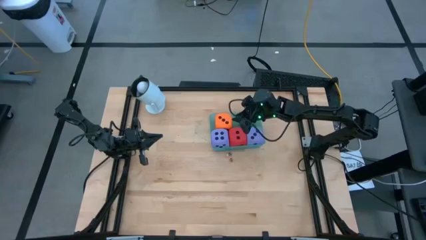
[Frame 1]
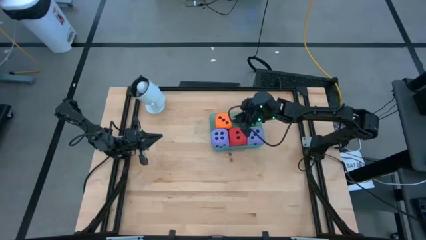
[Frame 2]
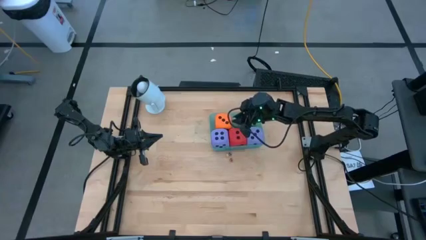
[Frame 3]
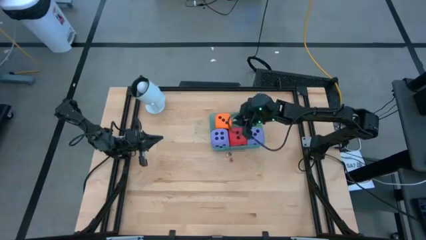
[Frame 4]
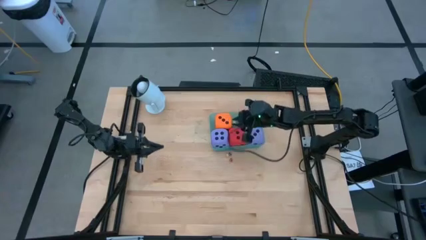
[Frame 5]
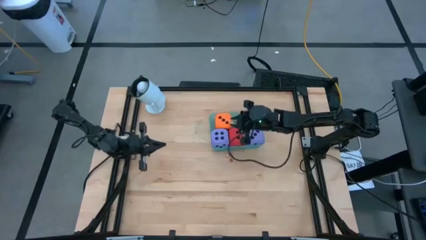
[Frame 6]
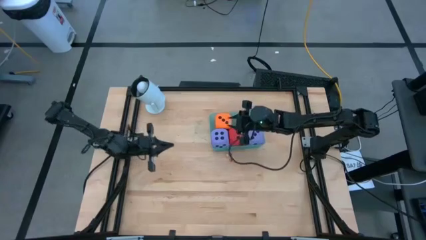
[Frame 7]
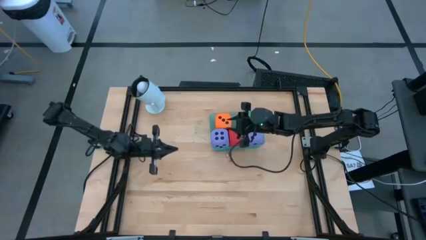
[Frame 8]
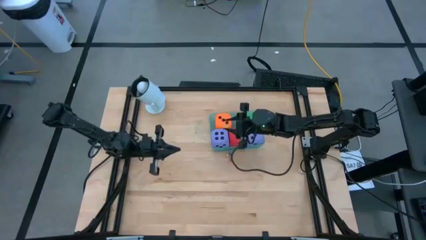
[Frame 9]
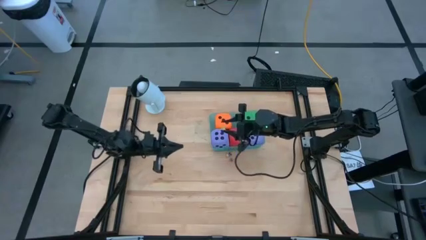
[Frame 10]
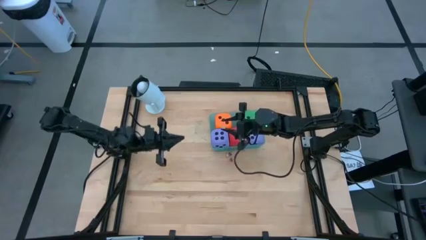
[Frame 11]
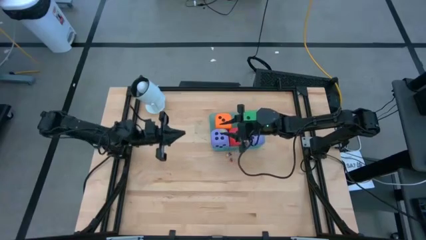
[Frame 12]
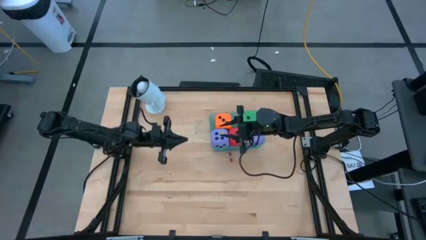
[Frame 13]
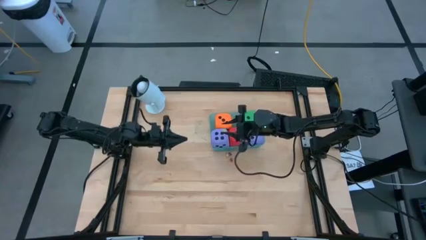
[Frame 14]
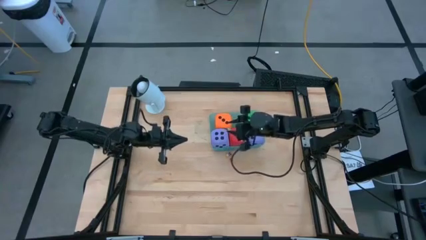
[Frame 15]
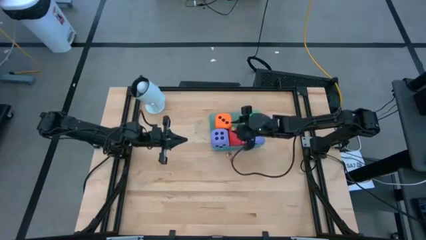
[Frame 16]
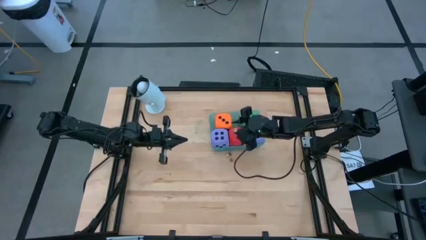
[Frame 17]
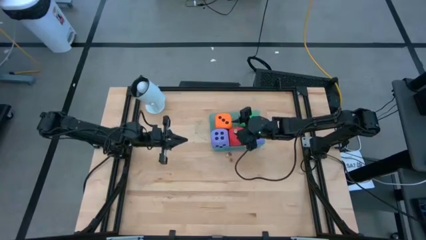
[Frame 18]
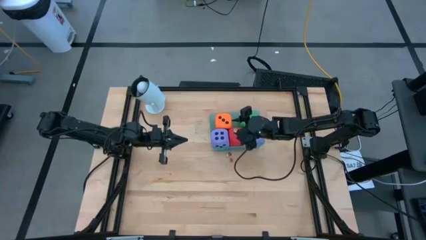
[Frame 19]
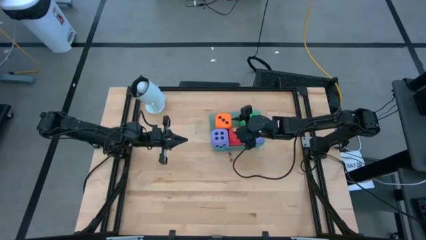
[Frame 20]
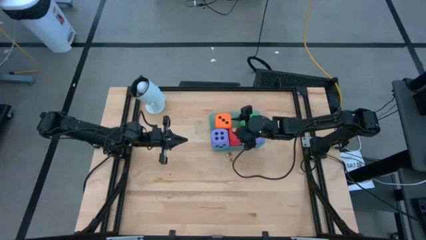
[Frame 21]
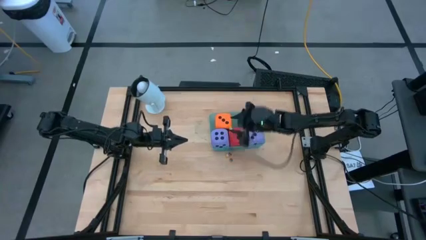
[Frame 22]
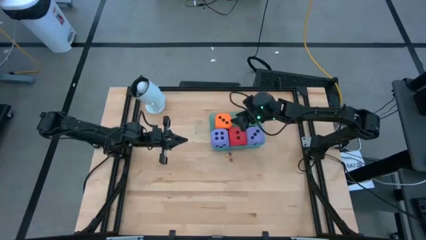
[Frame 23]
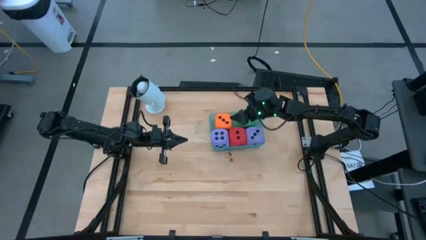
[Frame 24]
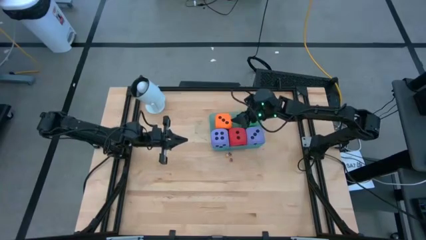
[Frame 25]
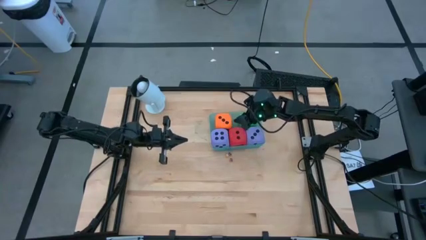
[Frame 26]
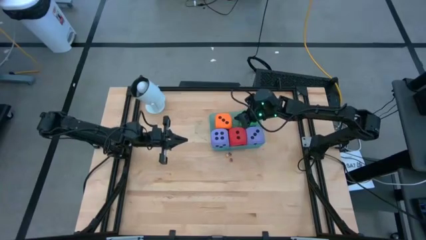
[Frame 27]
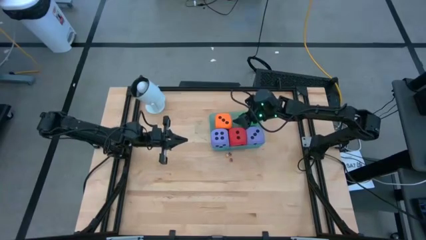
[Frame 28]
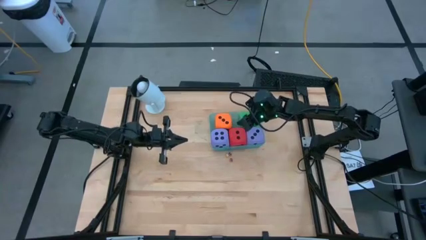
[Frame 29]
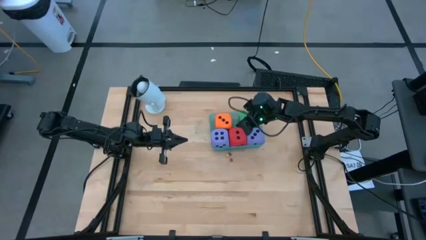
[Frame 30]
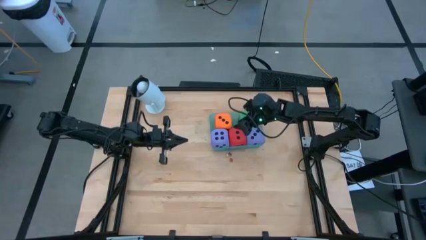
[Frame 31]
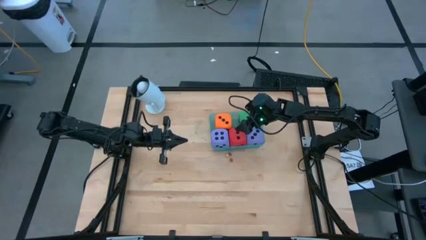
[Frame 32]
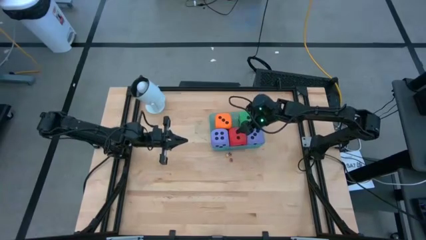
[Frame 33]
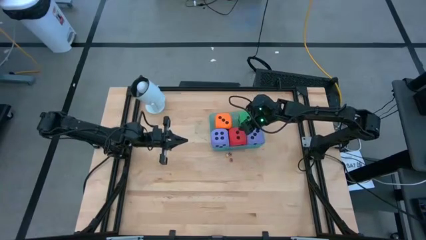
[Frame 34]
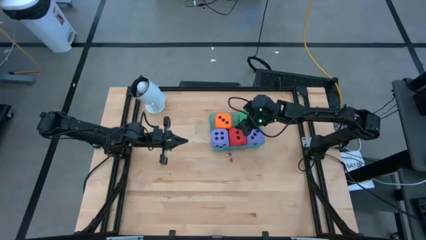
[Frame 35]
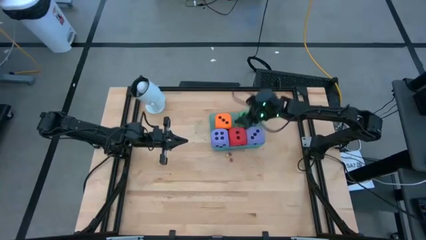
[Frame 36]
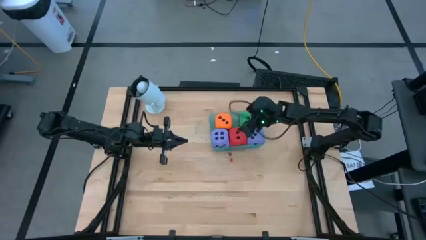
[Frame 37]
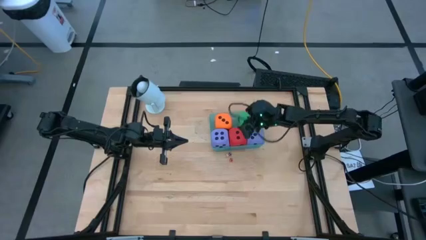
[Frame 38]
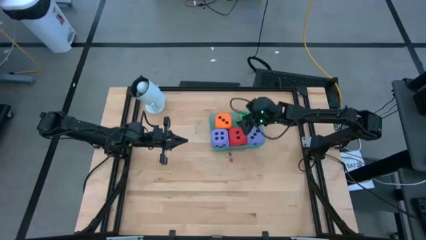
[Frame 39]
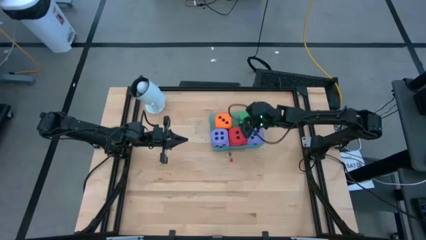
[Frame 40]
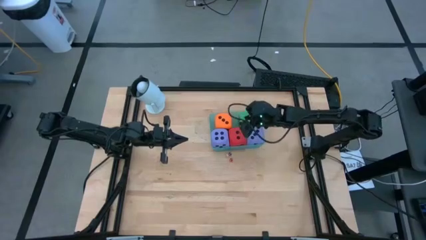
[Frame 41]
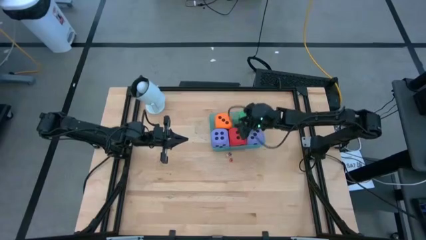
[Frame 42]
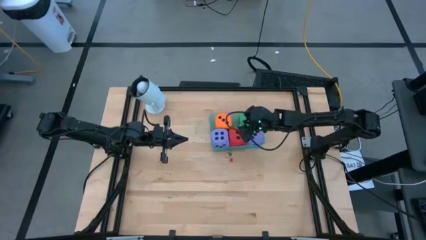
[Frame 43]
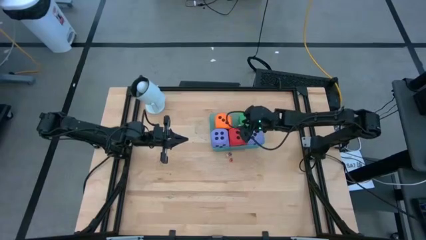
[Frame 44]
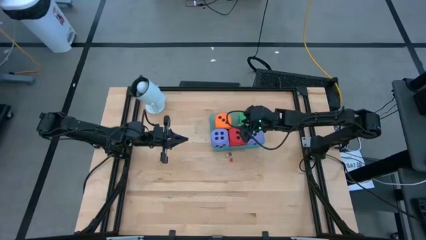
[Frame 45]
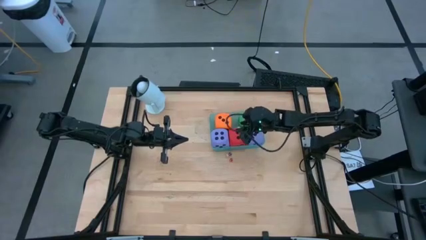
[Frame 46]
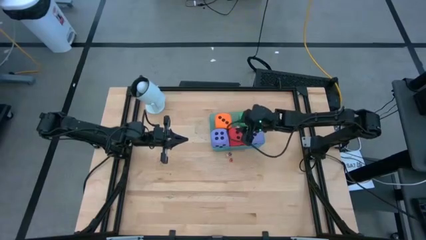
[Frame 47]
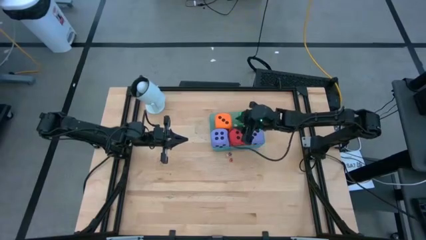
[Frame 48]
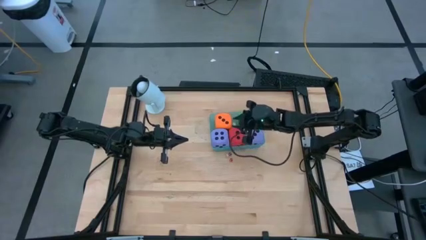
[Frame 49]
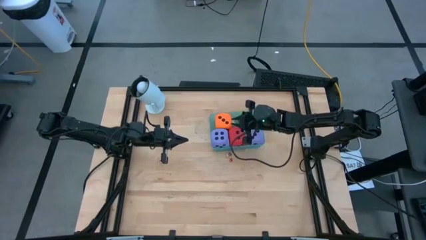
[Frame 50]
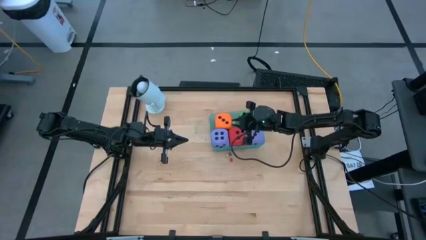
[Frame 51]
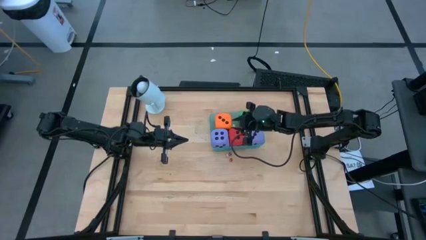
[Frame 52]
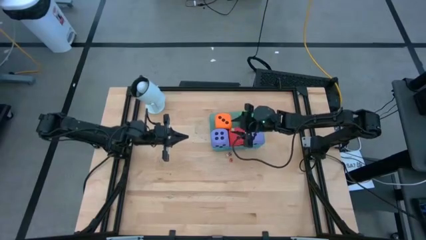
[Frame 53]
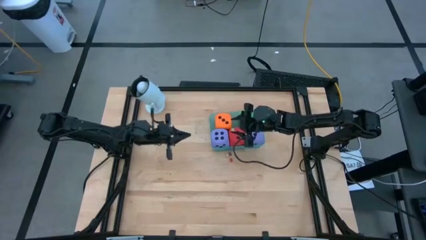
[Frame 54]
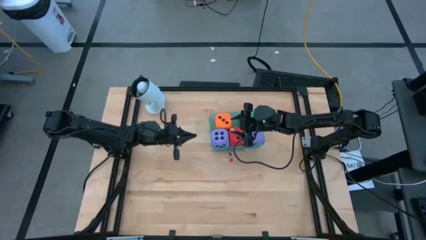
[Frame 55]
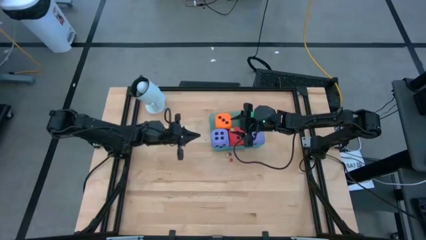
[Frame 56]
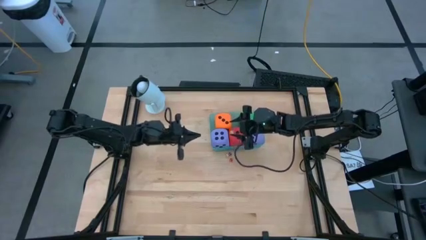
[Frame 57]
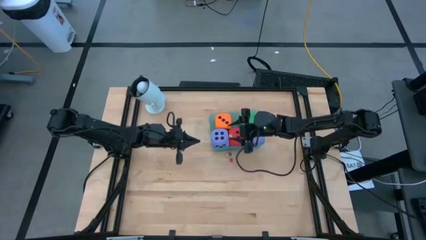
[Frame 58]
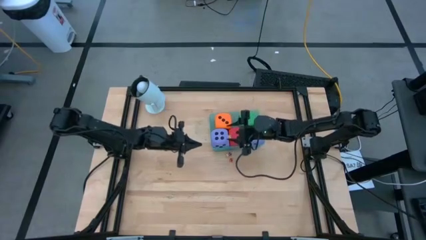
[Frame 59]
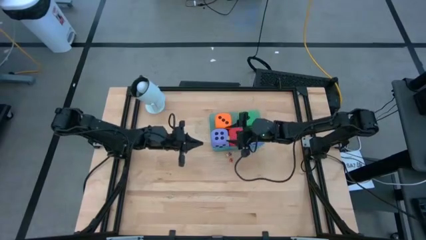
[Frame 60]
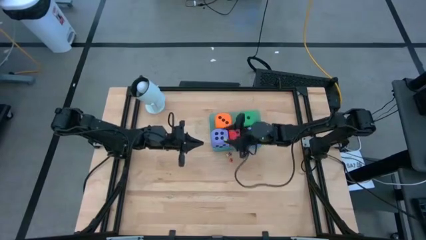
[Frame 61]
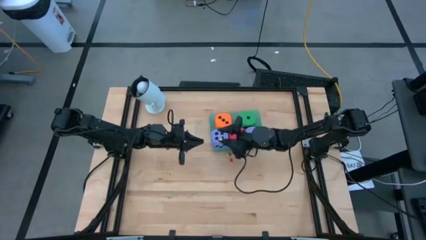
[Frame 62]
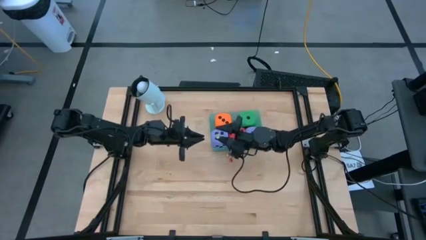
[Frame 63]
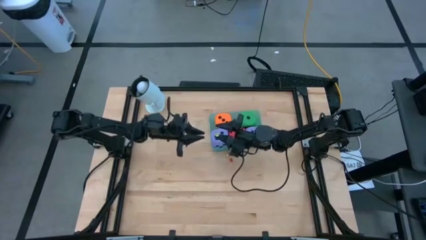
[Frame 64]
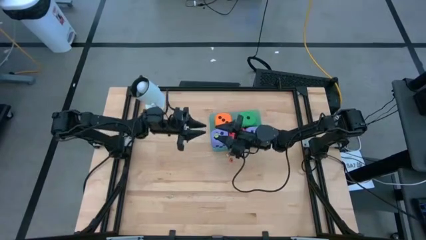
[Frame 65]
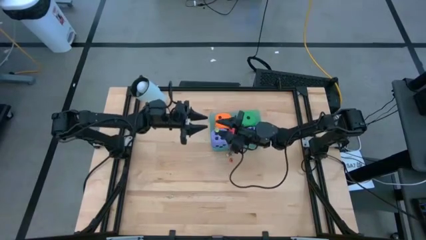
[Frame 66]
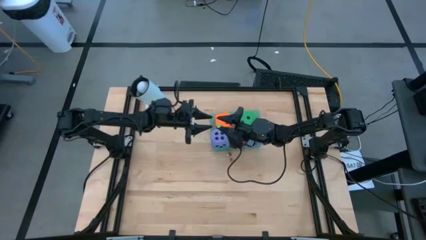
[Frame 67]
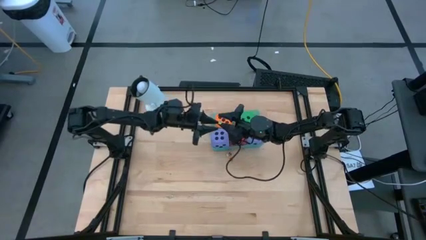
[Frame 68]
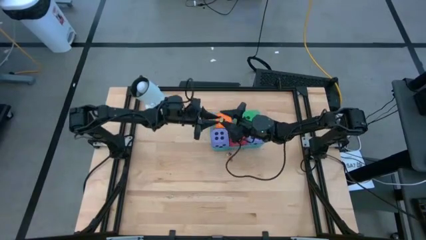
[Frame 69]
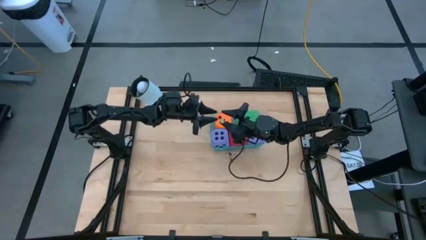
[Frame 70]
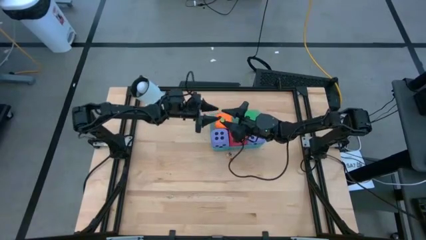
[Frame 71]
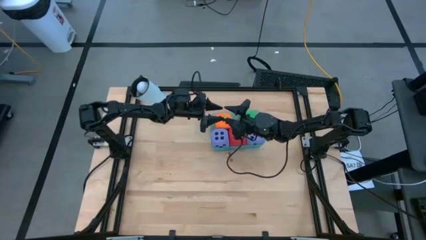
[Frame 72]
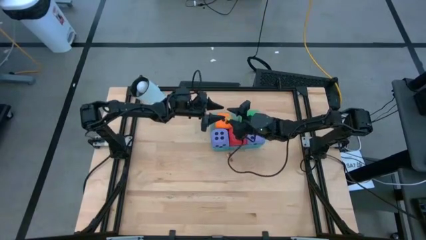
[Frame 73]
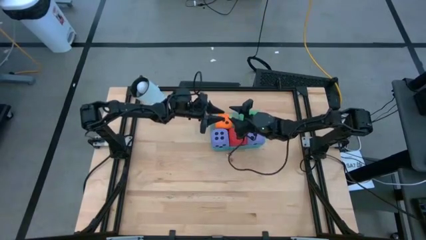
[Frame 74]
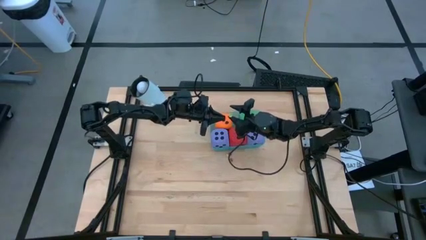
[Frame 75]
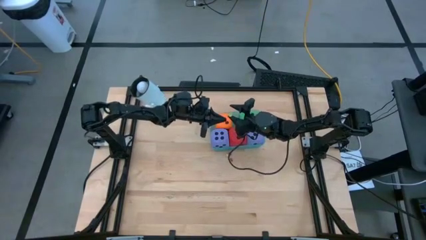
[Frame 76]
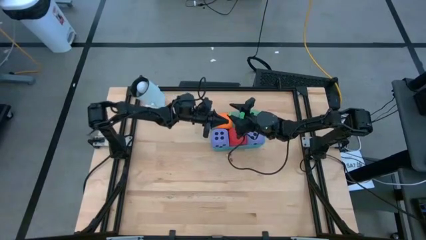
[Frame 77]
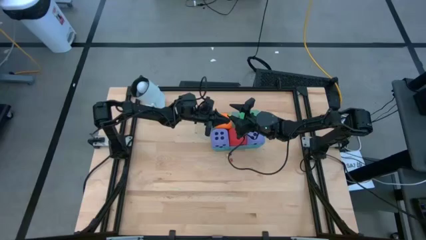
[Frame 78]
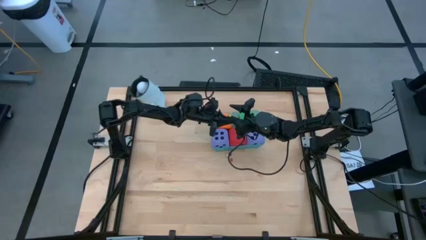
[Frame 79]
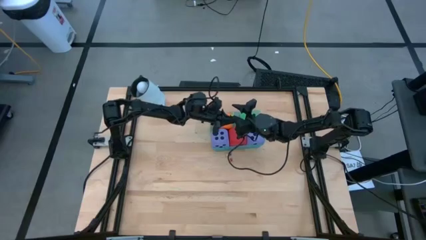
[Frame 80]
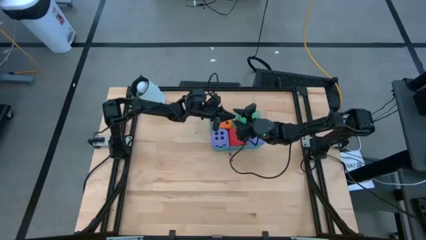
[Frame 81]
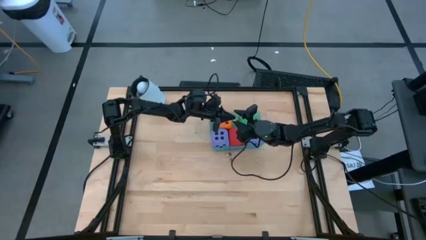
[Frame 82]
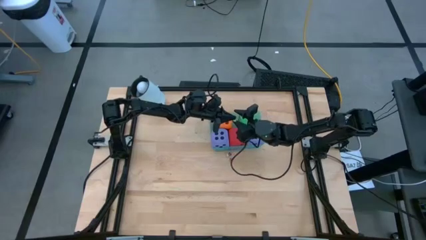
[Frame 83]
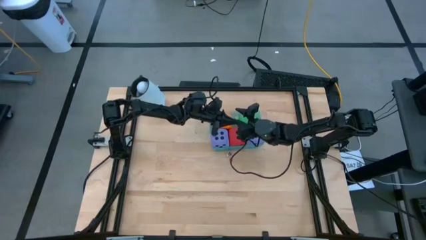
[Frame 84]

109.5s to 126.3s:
Task: Pick & Place Dice
Put the small green die into the blue bin
